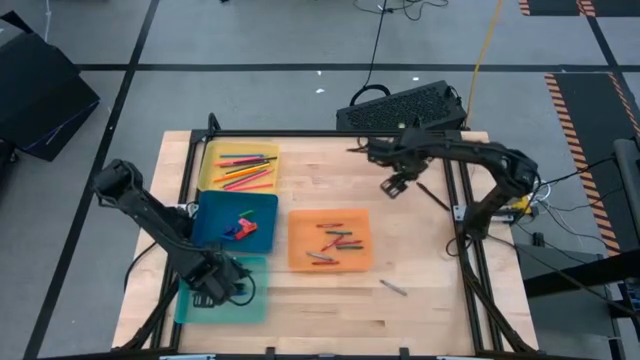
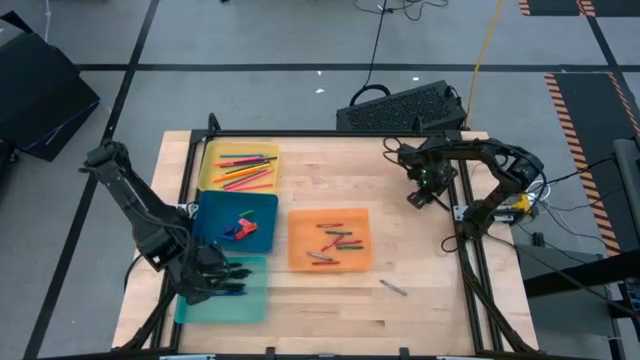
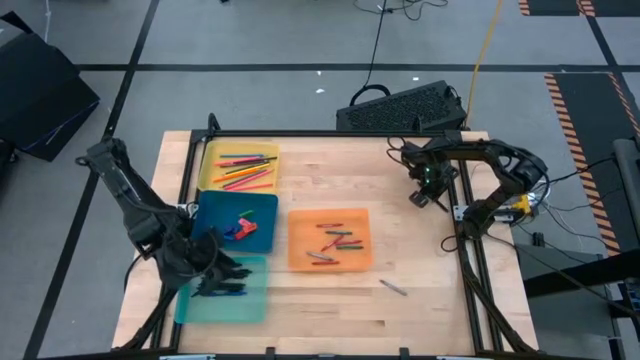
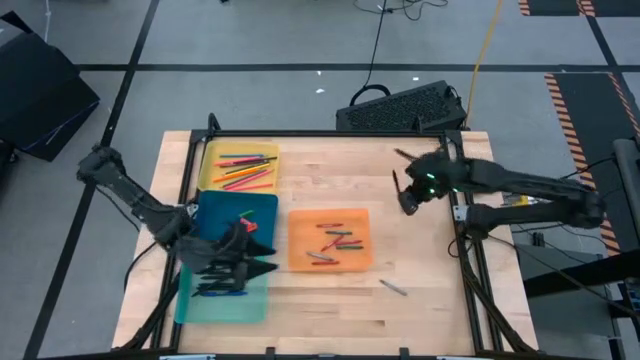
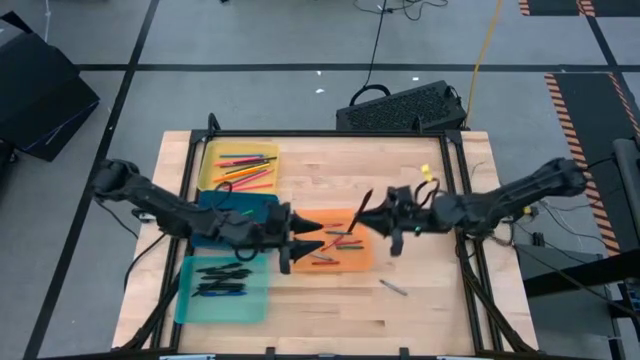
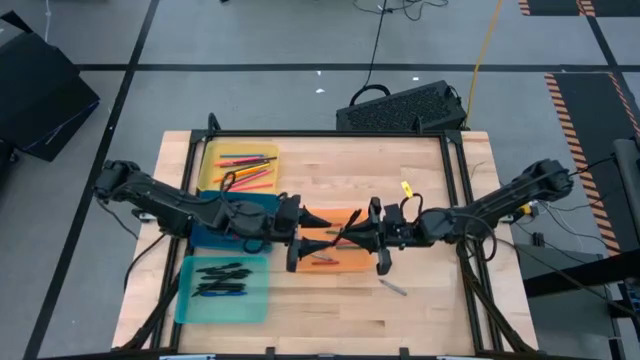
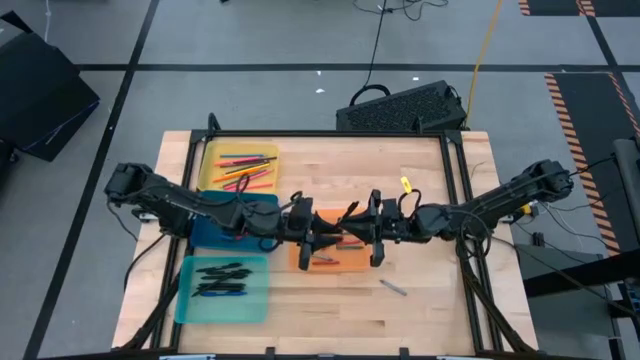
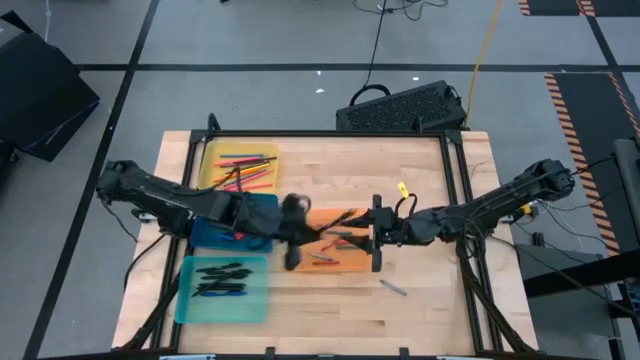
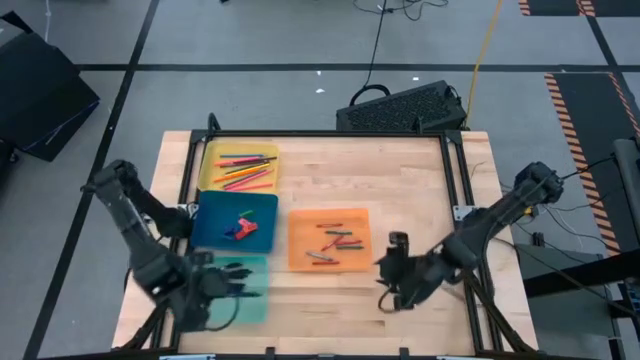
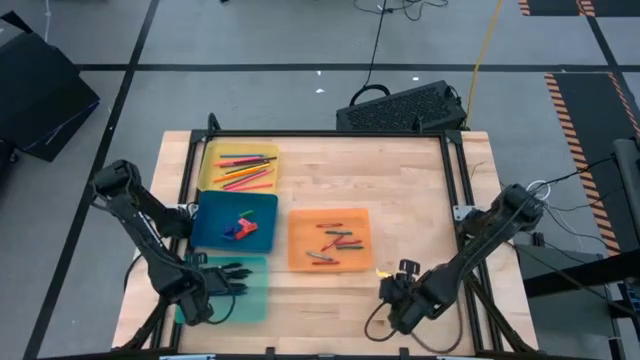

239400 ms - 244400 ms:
Task: Sort crayons/erasers/pens/pencils in bins
Put the black pen into the green bin

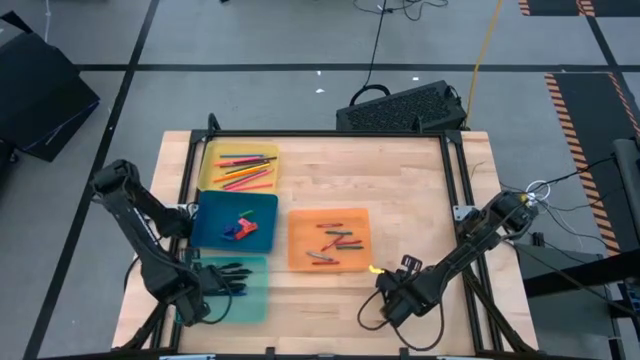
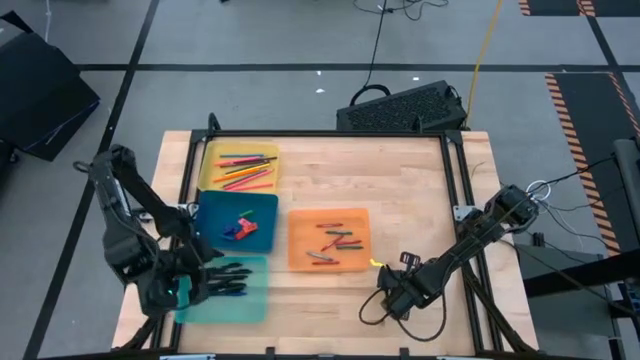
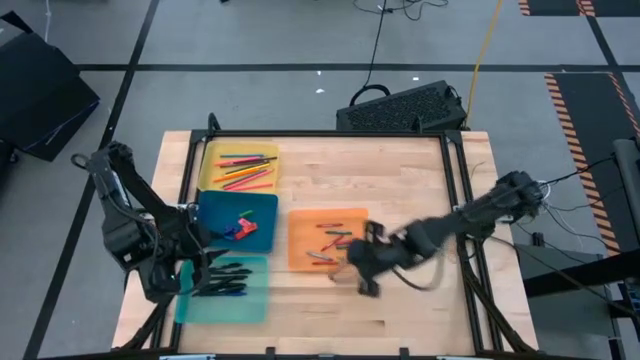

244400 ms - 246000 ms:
Put the gray crayon into the orange bin

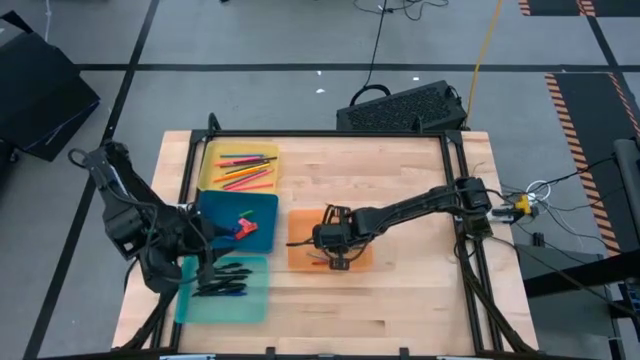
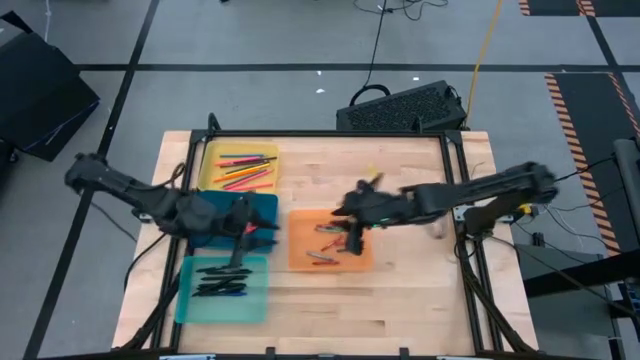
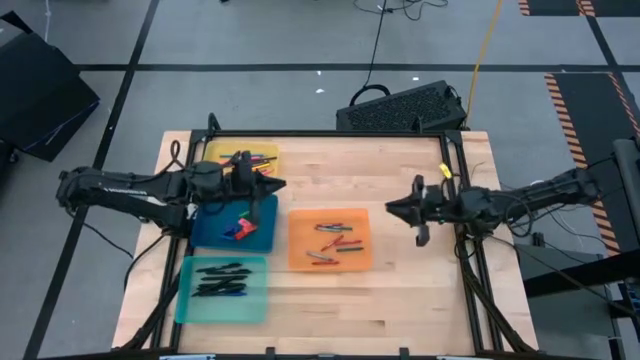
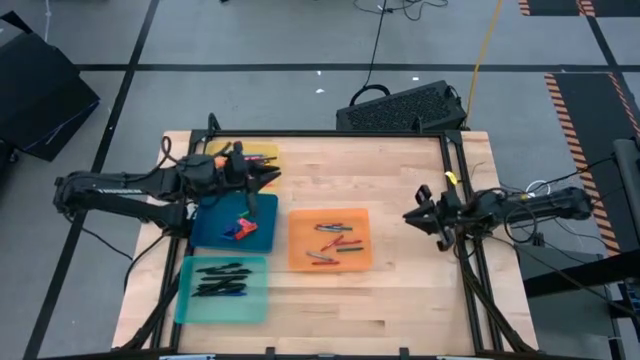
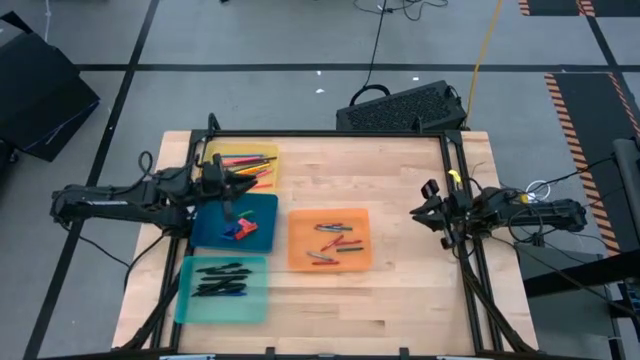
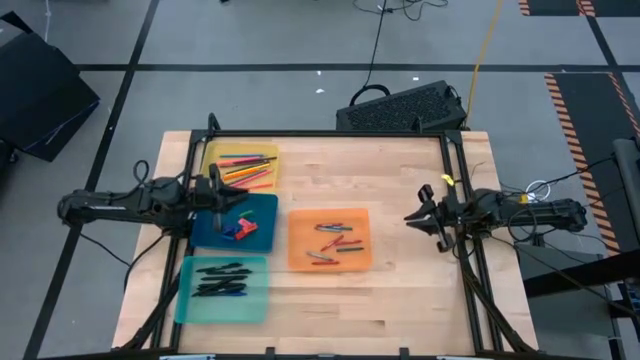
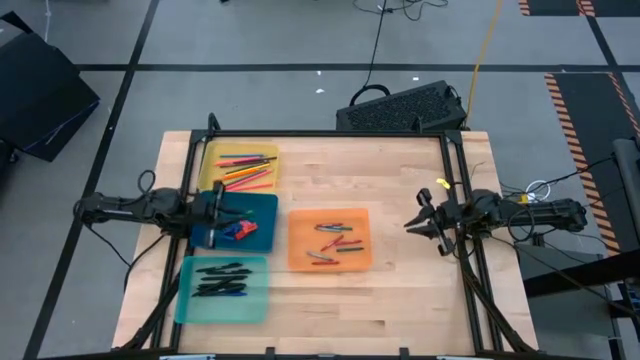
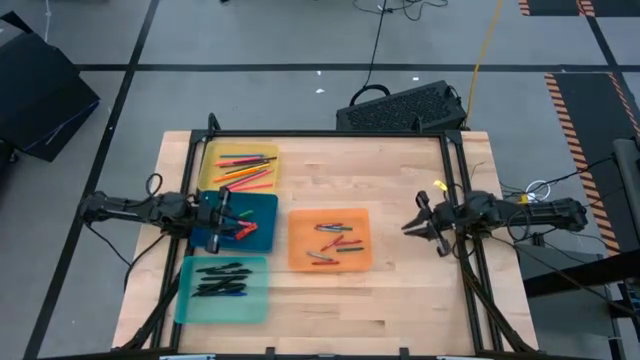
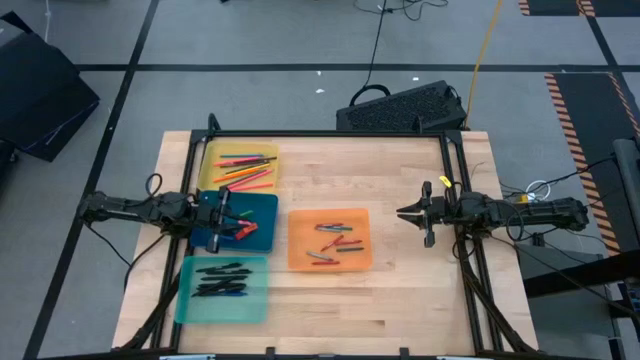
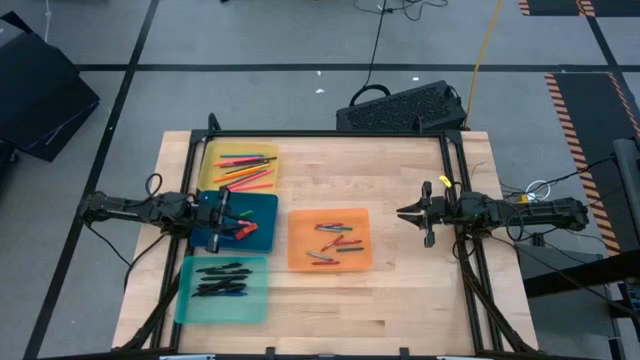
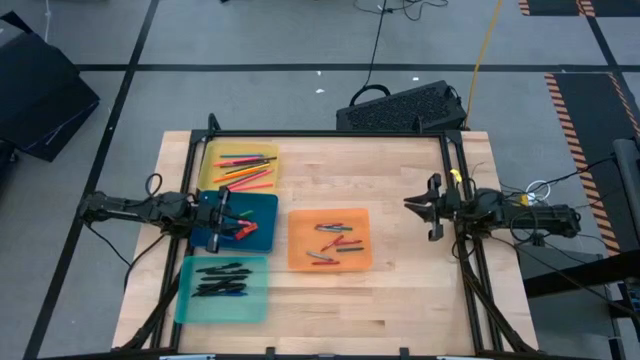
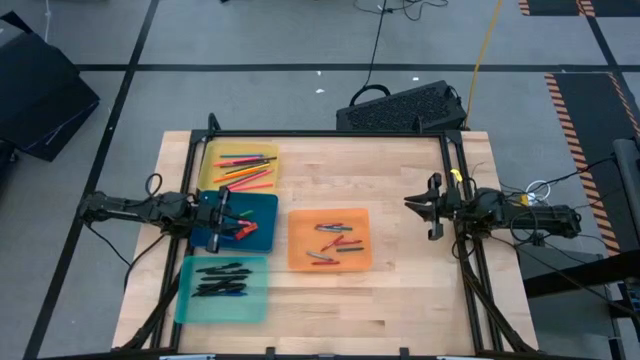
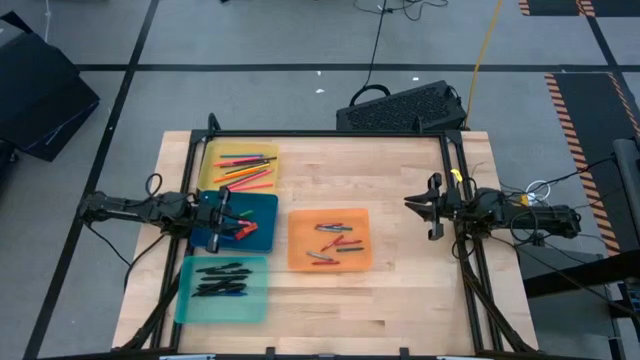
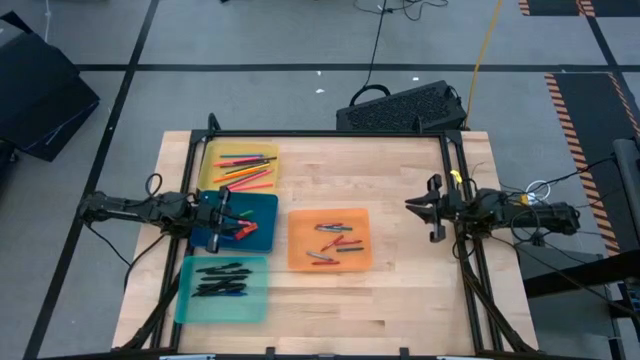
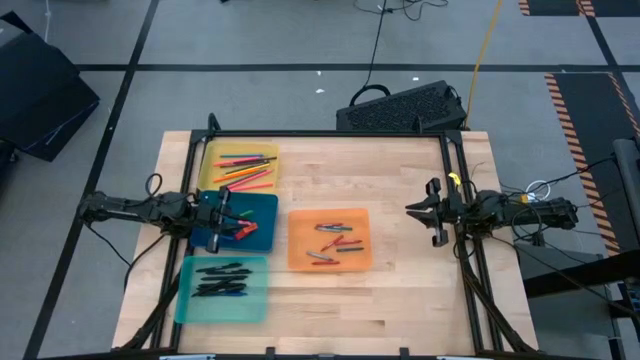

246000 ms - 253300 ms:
Return to Home Position

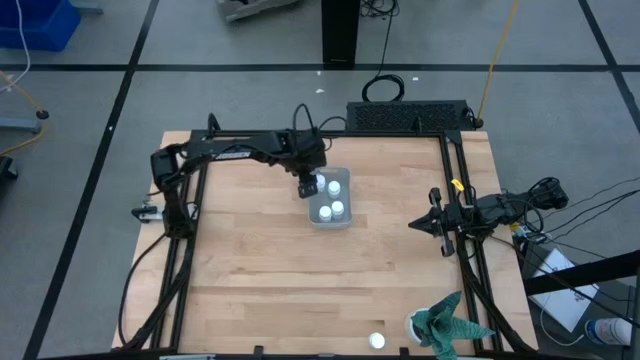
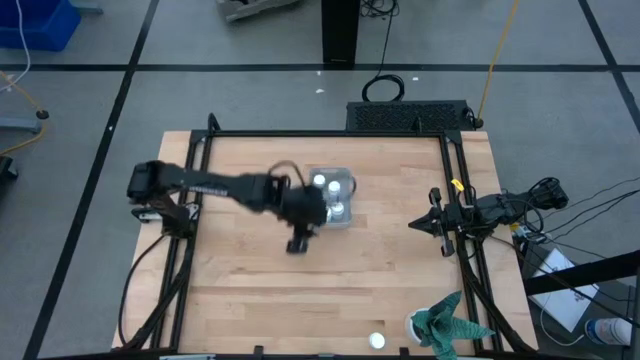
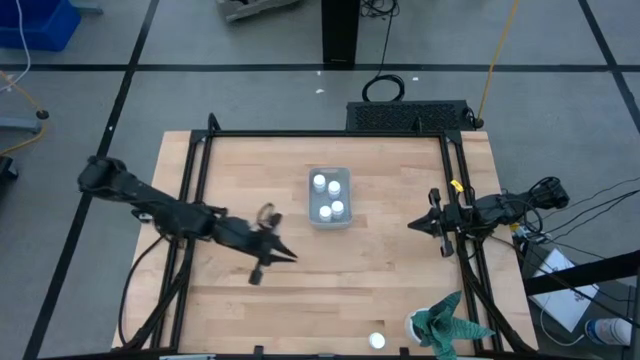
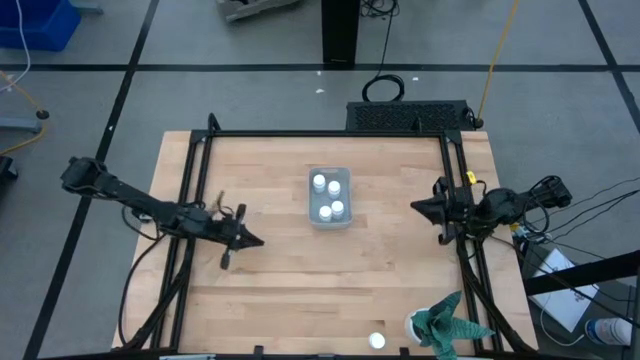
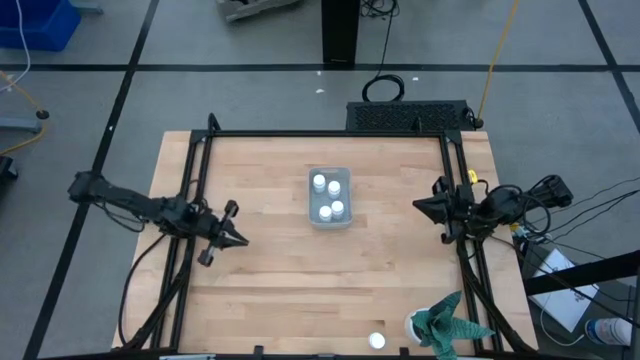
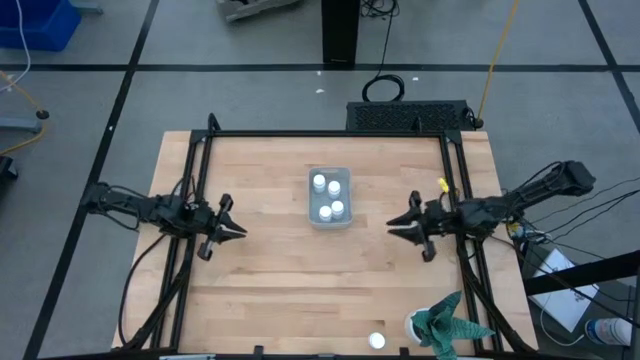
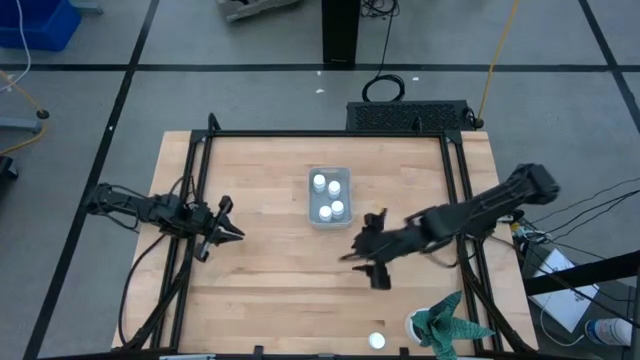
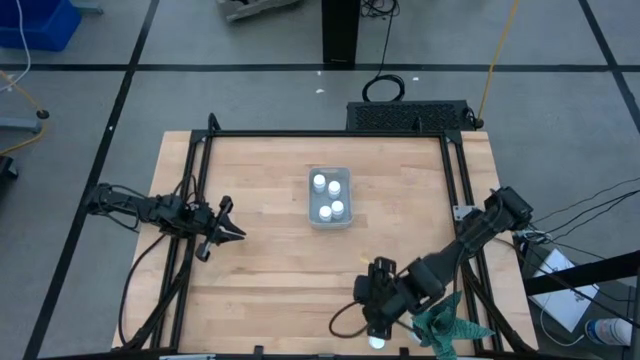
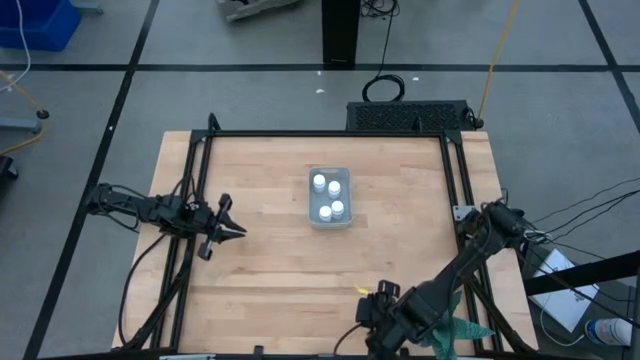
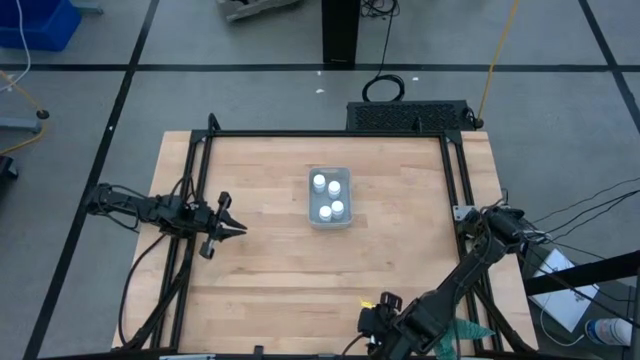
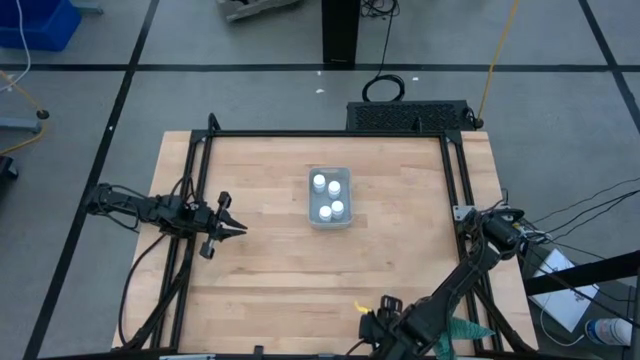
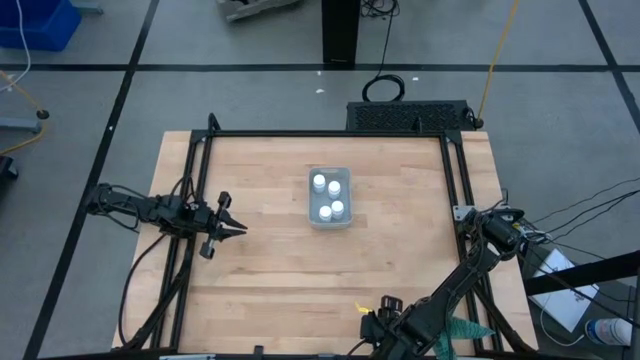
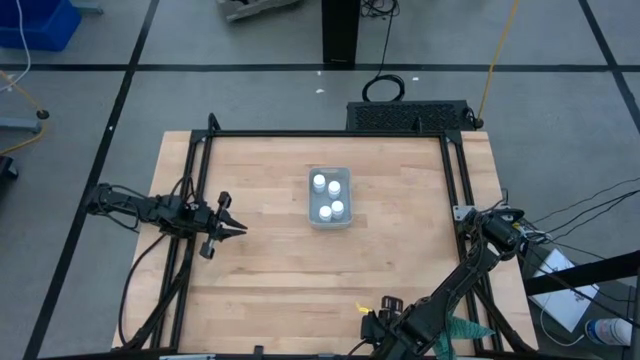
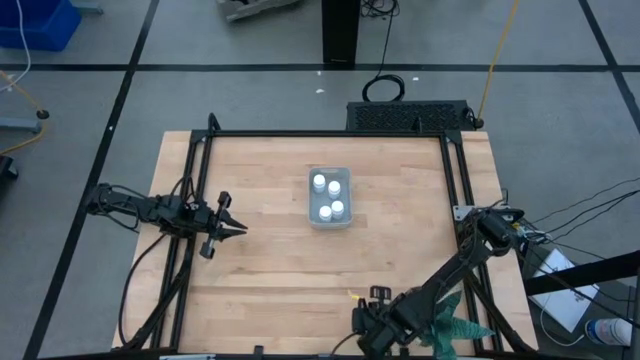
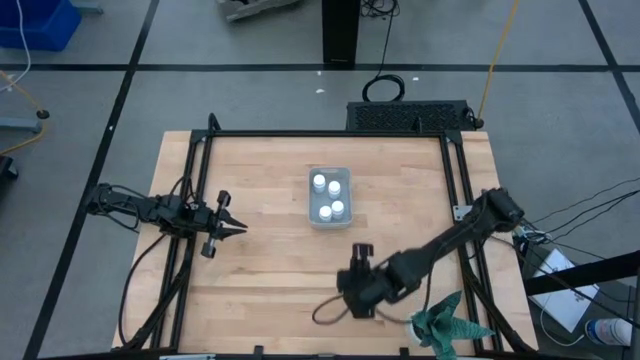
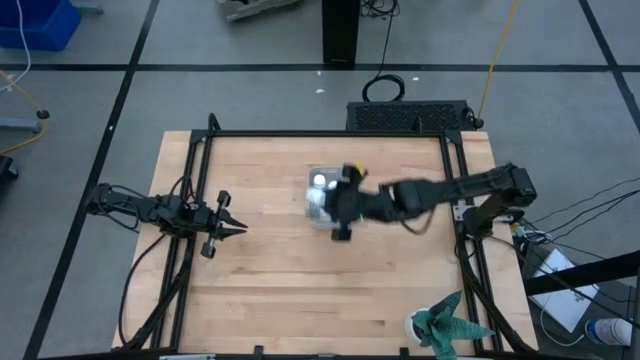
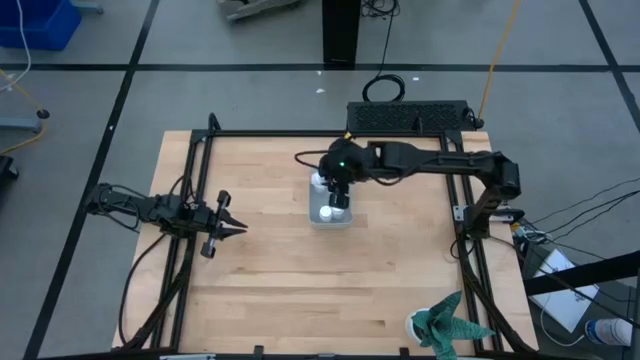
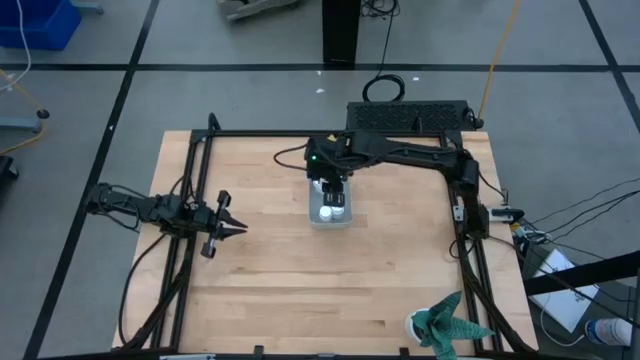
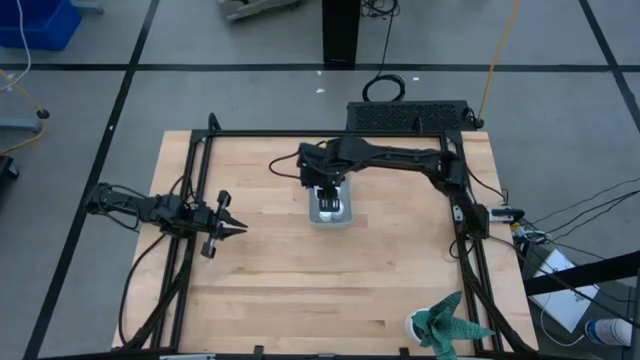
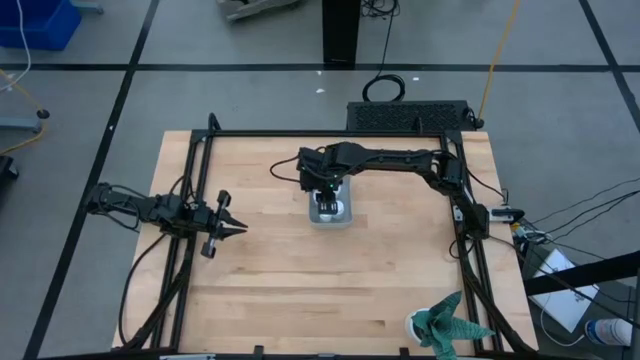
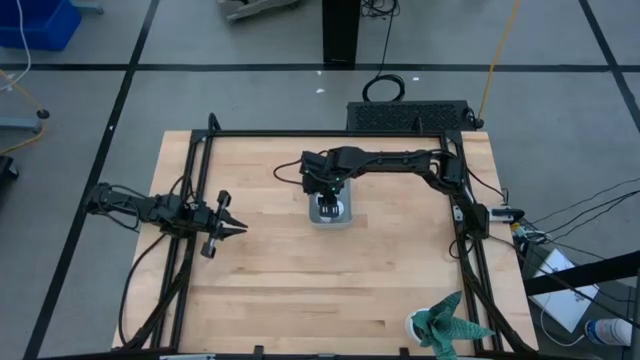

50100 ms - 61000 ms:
Task: Pick and place pill bottles into a basket
Put the white pill bottle into the gray bin
